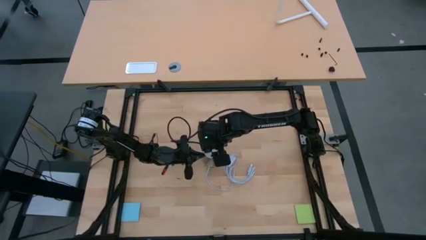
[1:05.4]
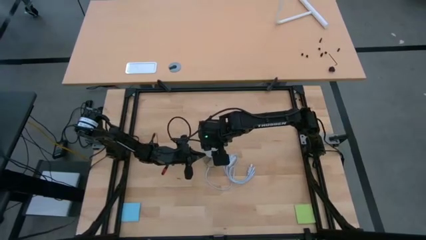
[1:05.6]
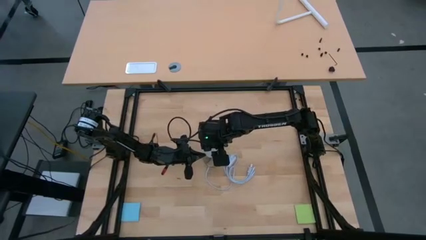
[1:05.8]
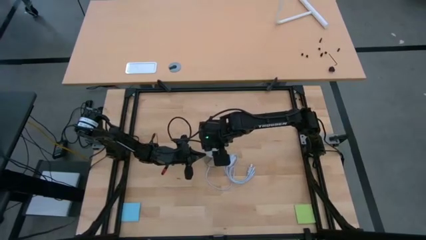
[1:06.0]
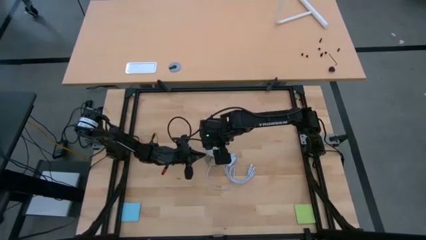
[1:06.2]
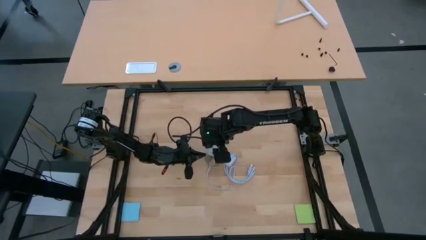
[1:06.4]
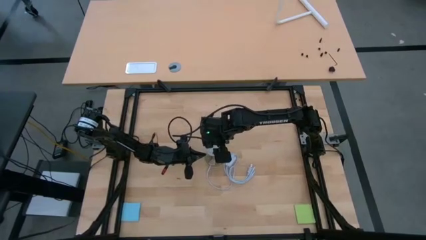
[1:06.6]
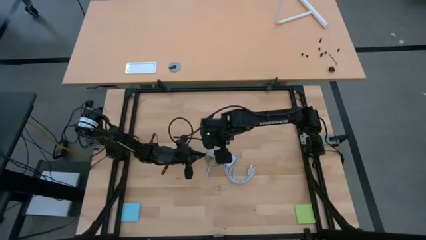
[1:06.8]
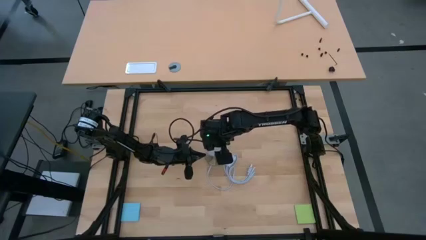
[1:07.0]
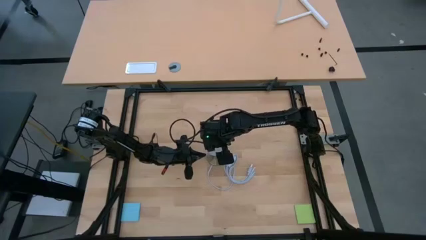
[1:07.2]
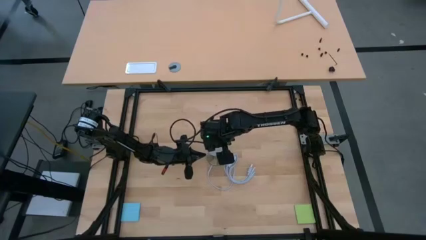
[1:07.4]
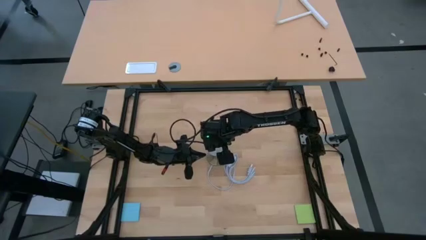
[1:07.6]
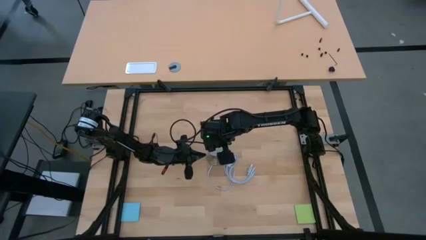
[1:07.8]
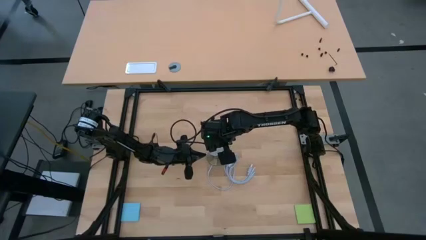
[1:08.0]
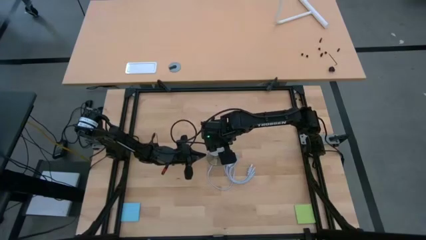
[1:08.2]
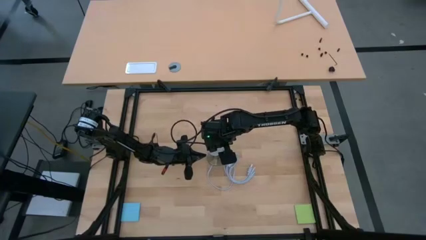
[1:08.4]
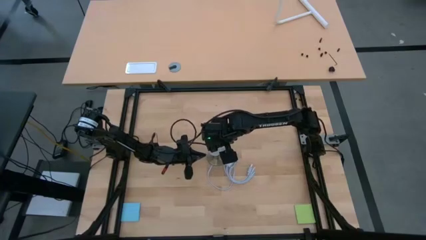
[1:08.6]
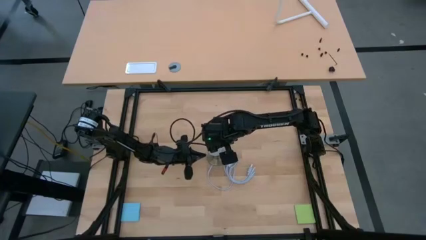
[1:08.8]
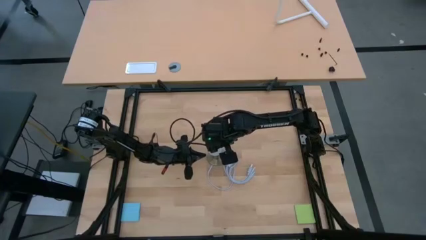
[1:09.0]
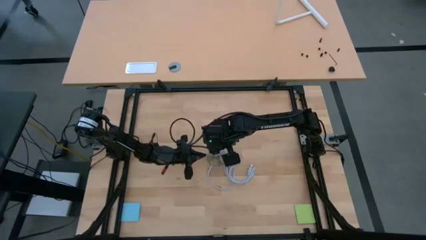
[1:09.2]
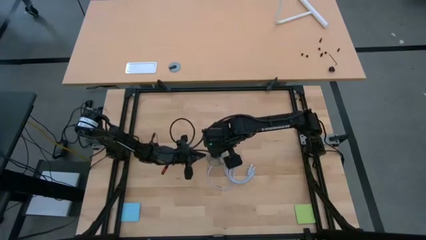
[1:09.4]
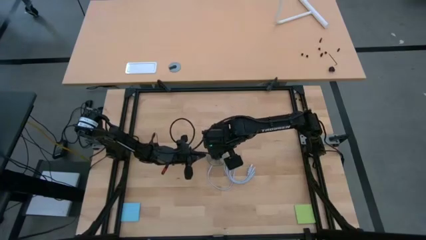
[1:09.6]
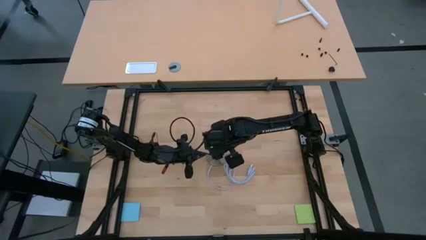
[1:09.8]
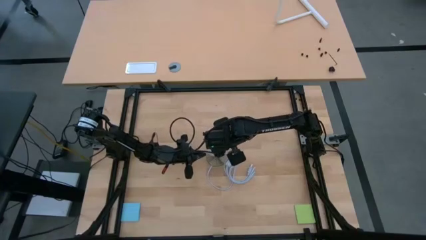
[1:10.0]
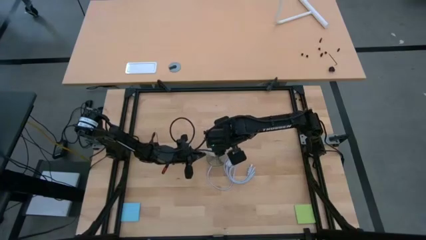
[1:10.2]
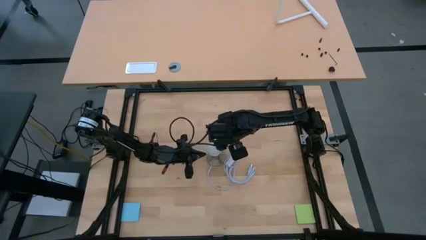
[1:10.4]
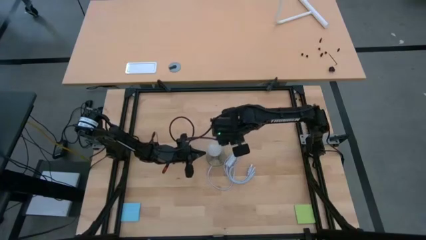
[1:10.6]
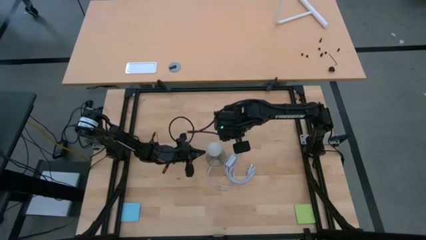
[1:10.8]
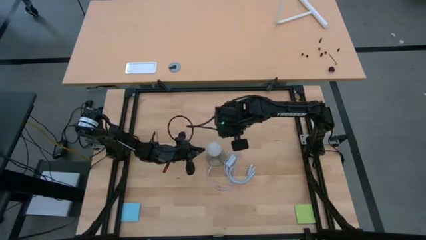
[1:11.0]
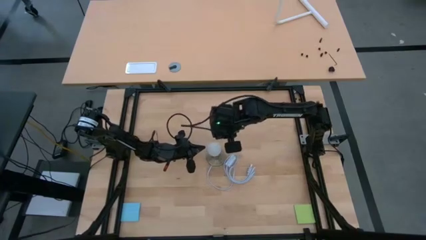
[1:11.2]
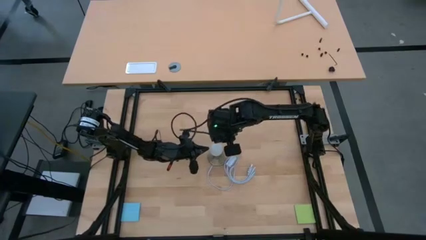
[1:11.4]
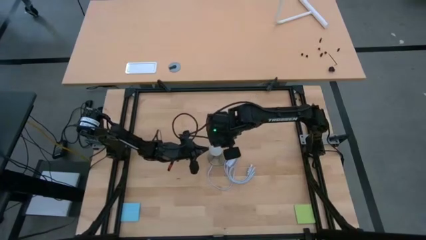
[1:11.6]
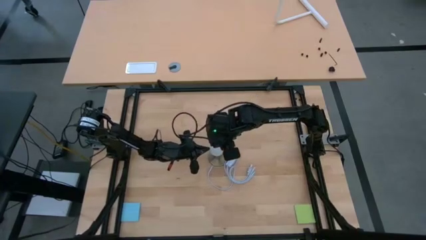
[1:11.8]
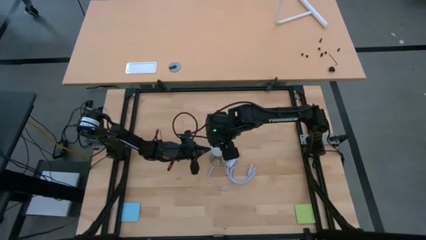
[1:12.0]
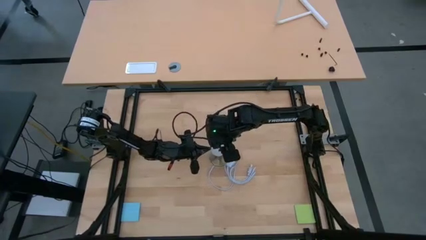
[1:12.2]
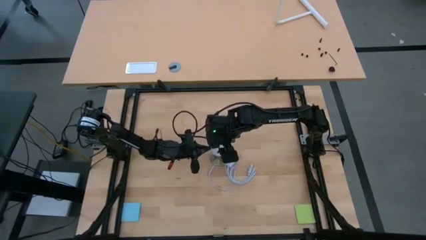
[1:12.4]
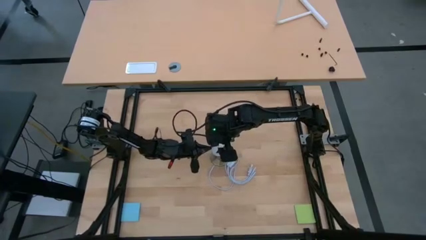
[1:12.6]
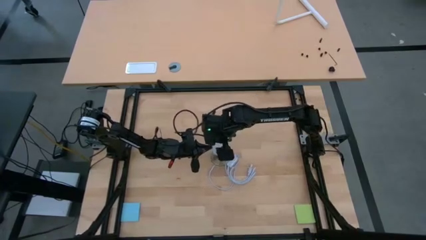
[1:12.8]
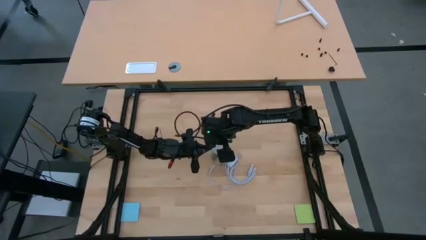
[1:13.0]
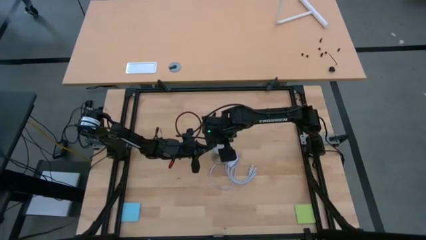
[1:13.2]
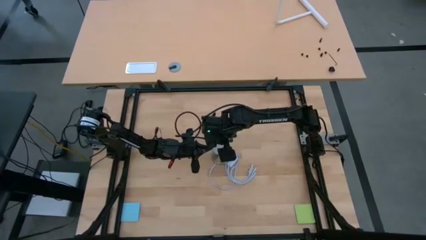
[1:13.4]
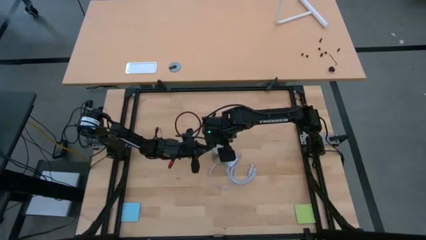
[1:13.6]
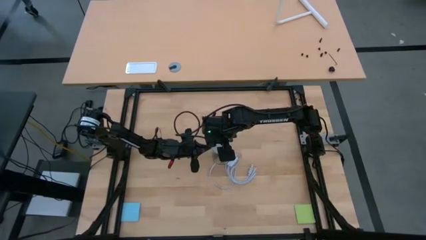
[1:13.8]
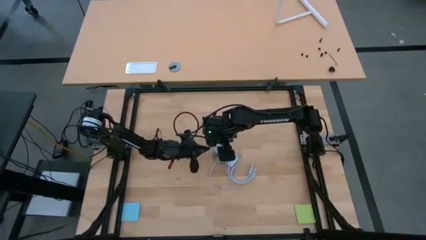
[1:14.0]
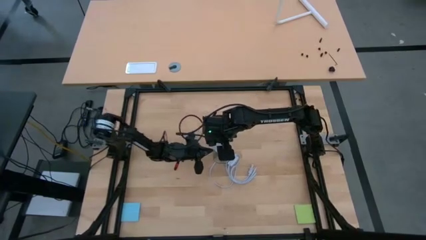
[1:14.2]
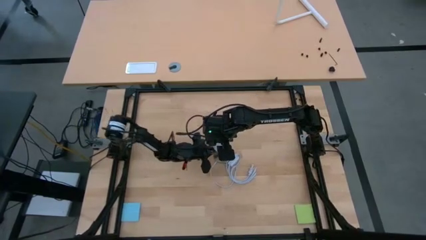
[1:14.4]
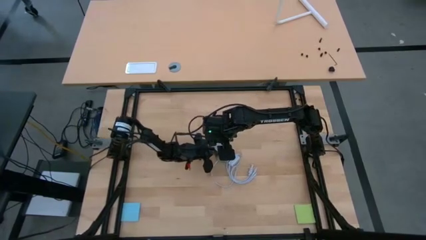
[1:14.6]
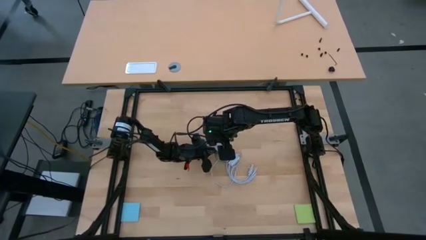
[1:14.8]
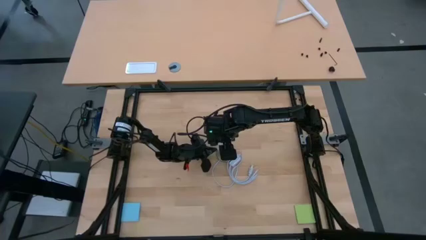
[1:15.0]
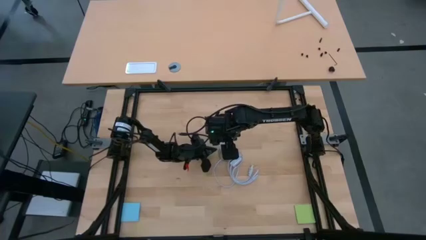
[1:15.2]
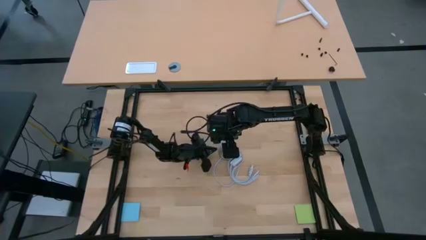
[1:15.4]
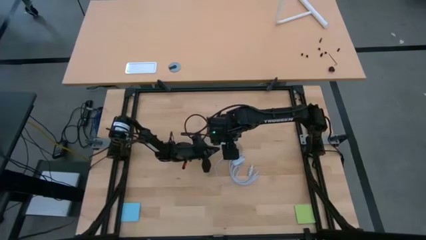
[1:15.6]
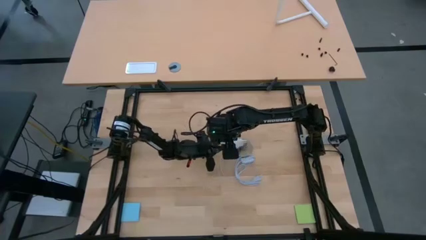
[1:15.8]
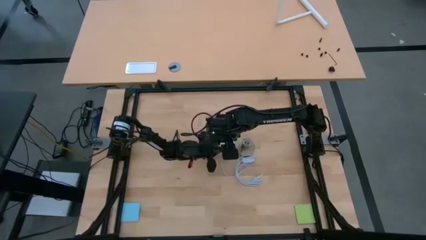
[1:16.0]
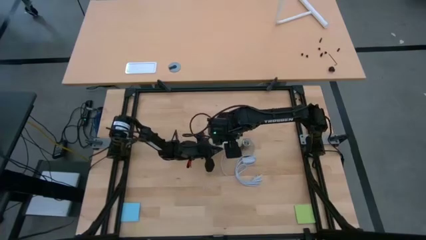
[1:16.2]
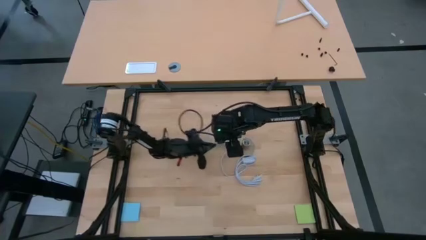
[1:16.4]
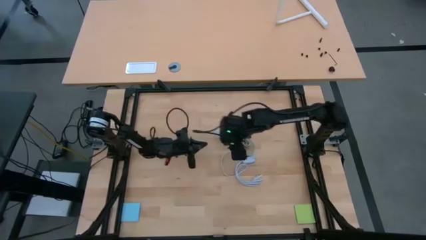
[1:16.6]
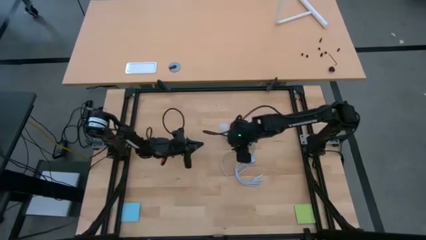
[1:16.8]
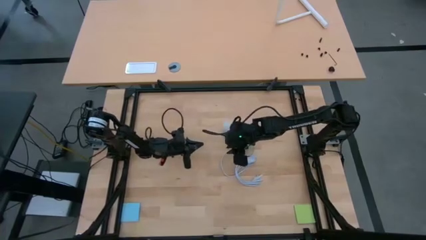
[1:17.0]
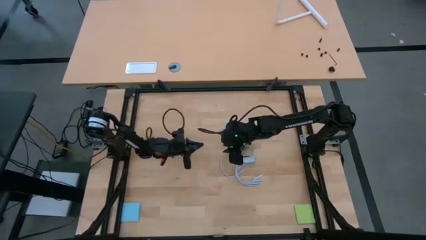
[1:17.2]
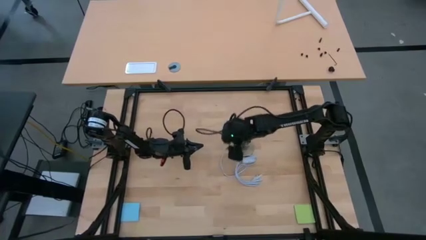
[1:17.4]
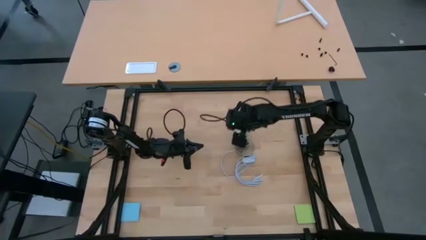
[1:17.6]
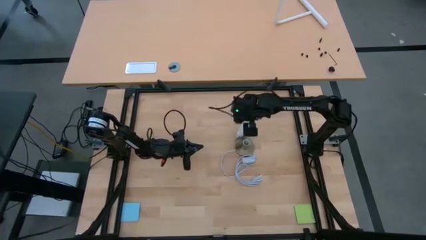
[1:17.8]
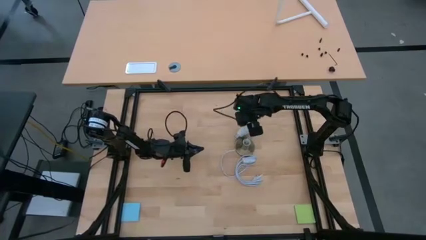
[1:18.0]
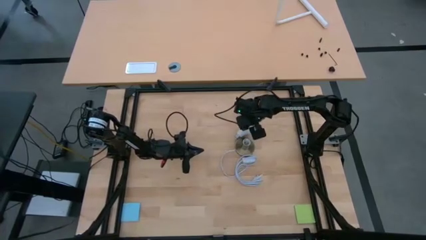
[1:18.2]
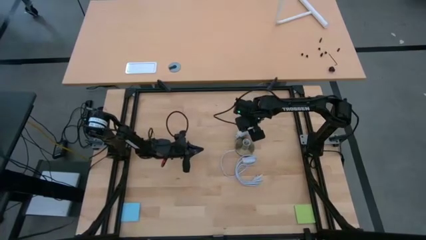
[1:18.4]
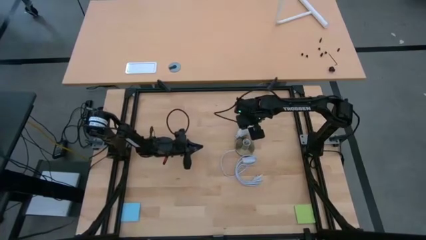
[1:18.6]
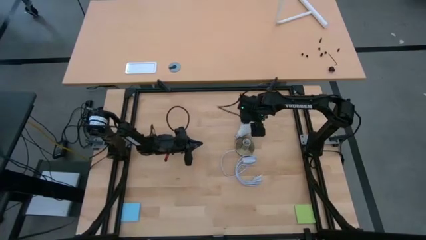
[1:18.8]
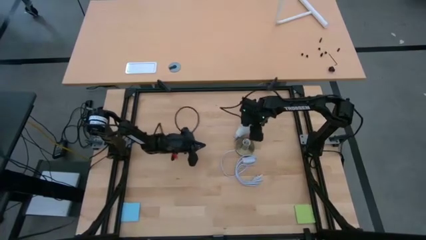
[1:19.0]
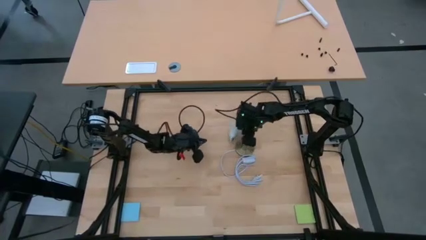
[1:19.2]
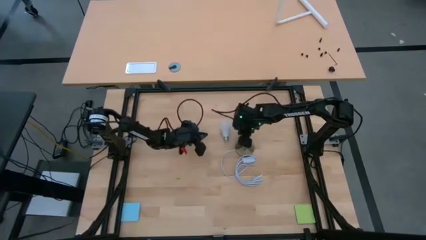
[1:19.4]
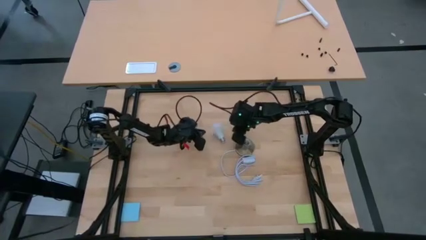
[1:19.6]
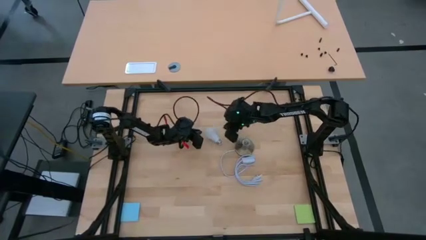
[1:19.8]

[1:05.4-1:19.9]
Task: Screw lightbulb
Insert the white lightbulb into the golden lamp

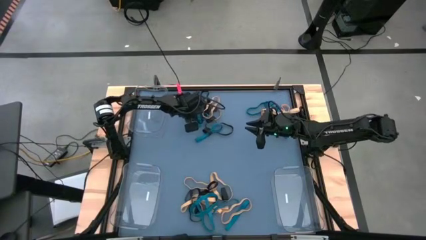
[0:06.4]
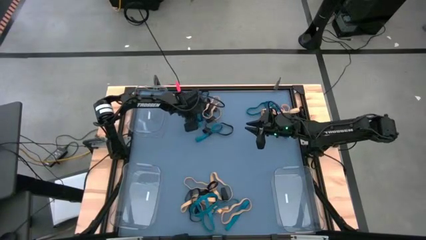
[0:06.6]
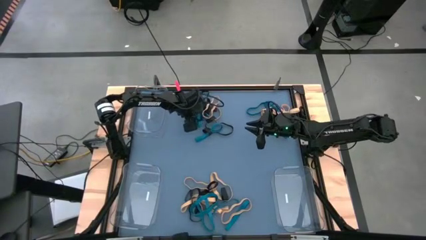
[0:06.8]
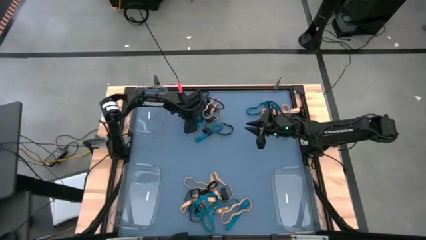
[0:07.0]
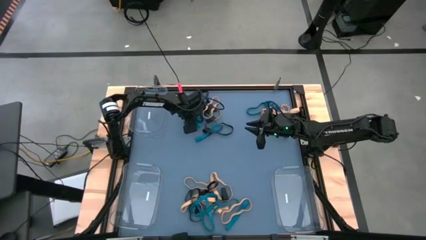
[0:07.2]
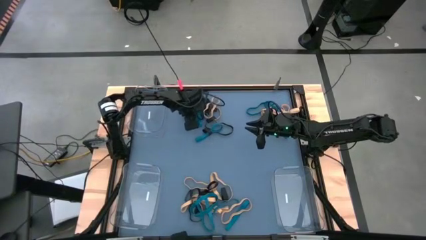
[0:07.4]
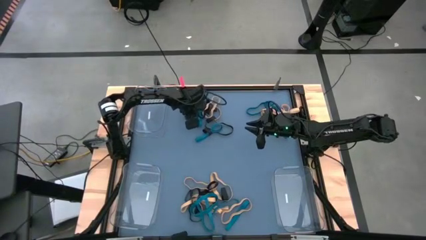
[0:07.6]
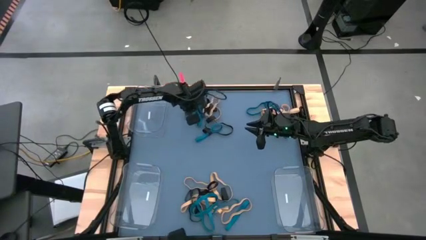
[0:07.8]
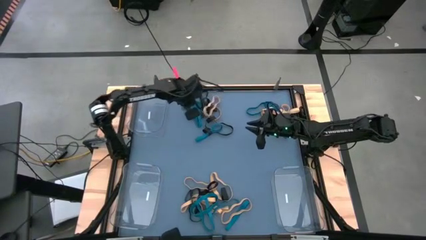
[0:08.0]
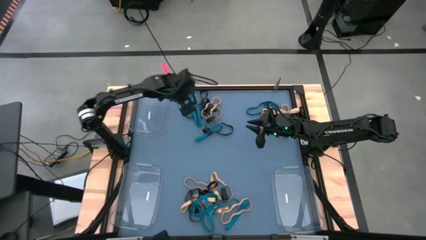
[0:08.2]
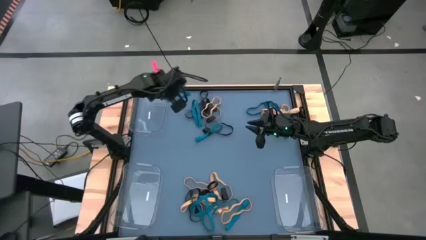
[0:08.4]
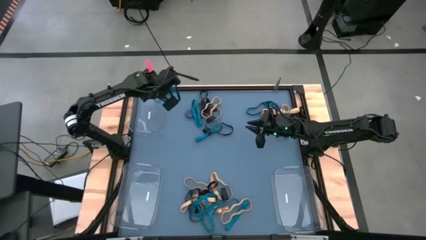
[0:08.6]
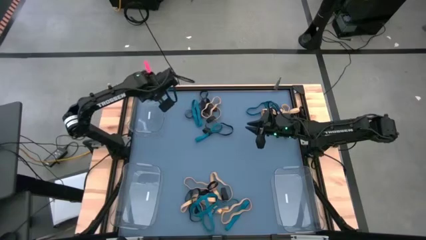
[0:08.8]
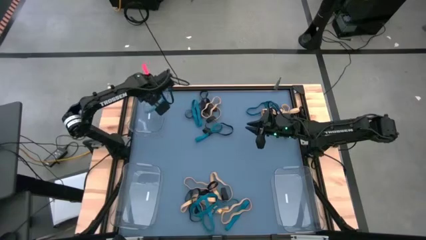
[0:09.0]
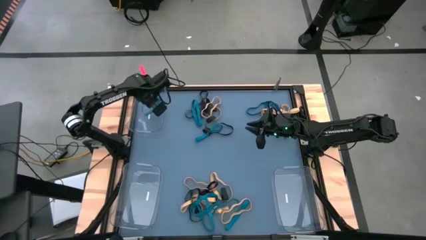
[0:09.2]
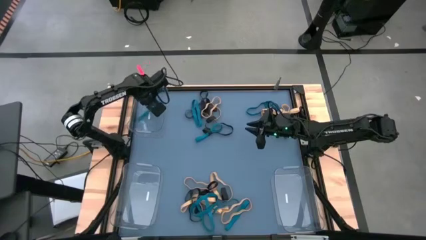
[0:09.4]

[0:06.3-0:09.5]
Task: Sort rubber bands into baskets
Put the blue rubber band into the top transparent bin
